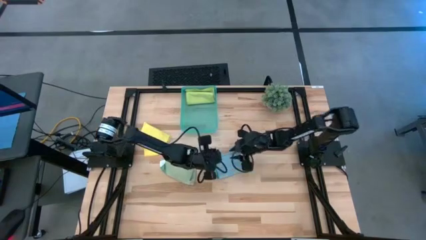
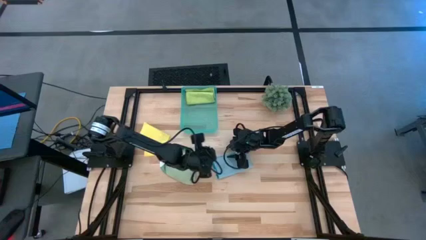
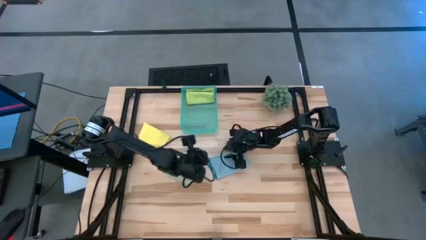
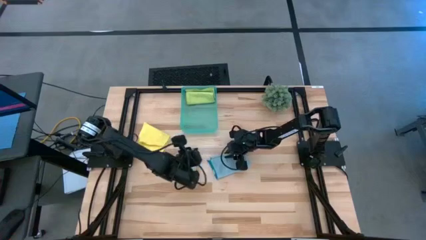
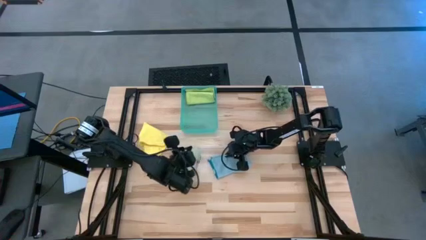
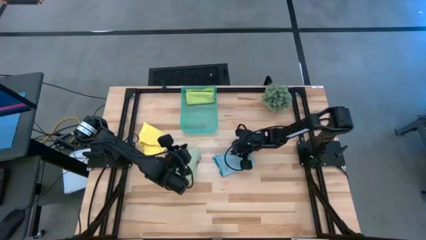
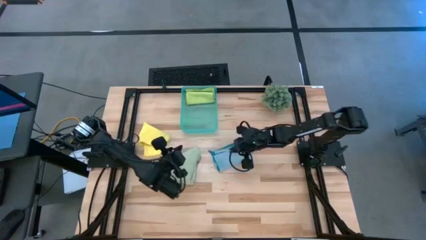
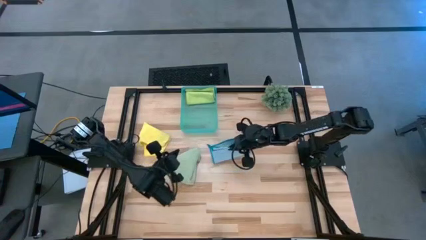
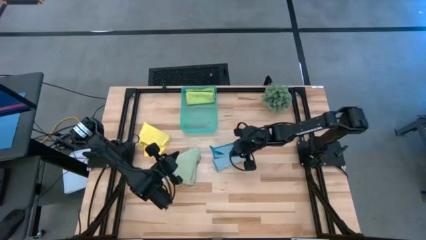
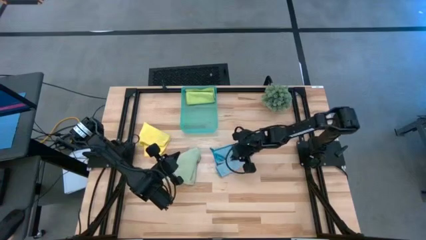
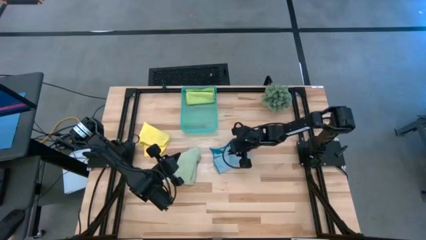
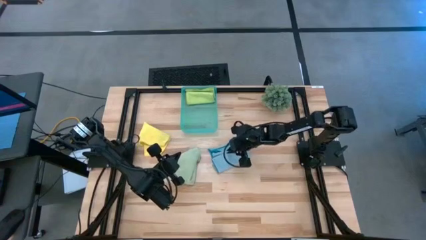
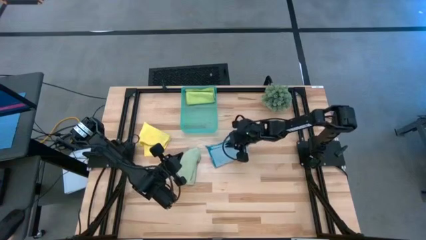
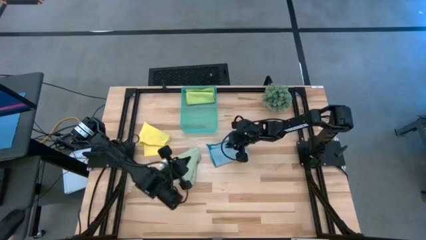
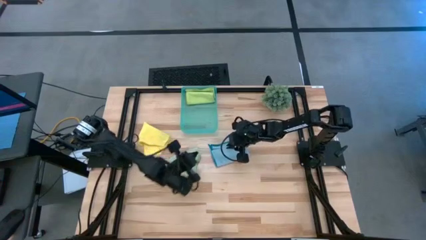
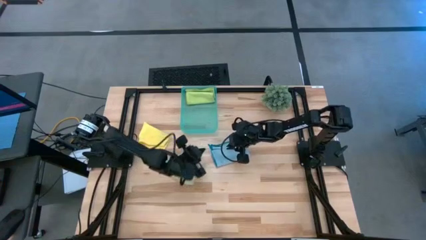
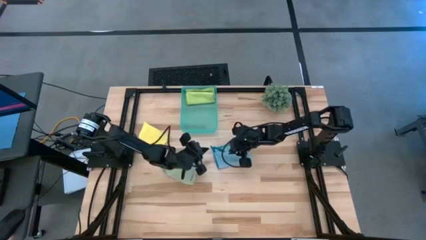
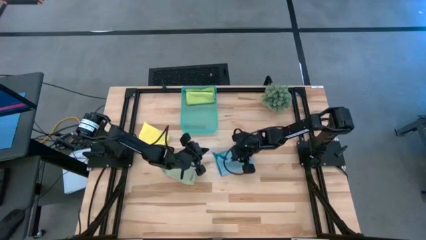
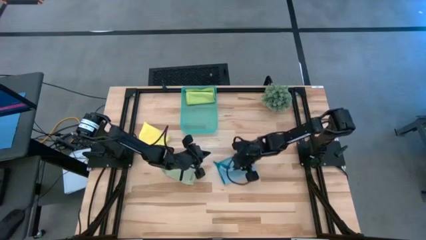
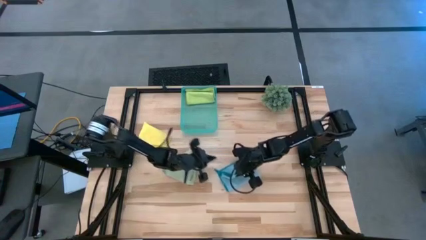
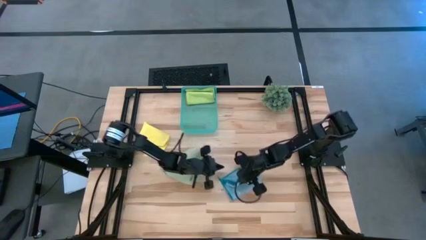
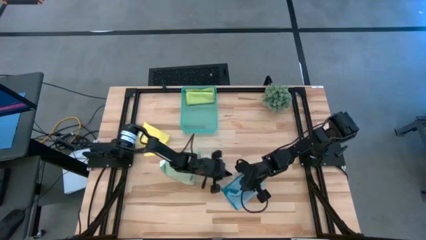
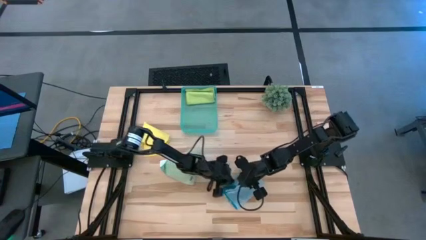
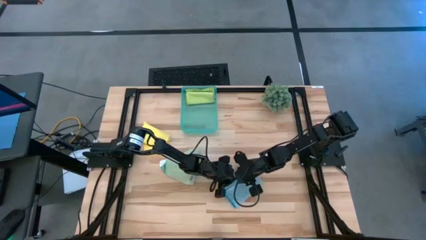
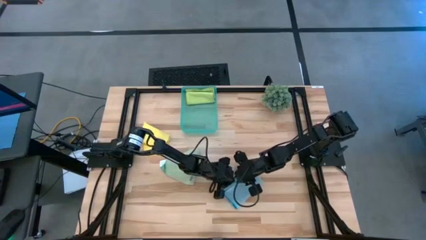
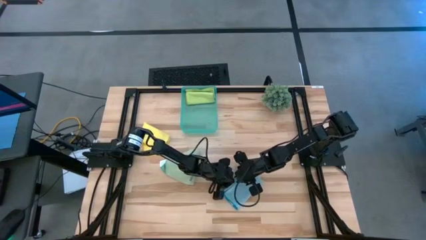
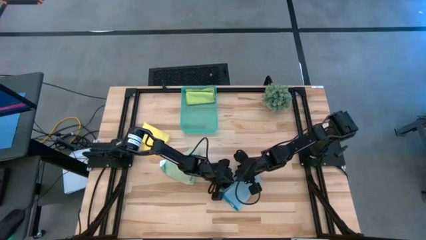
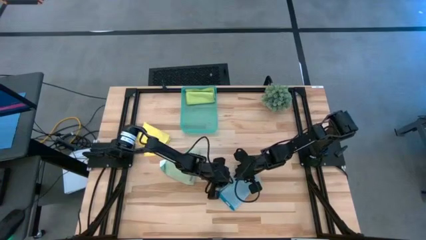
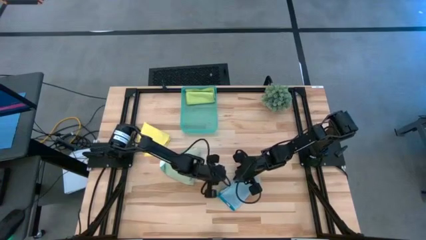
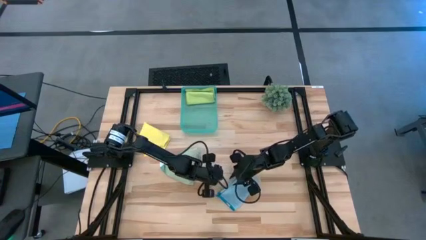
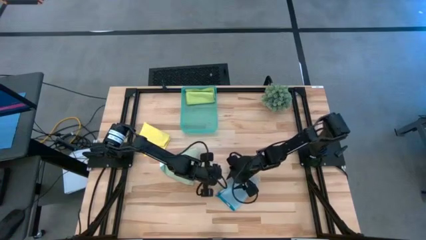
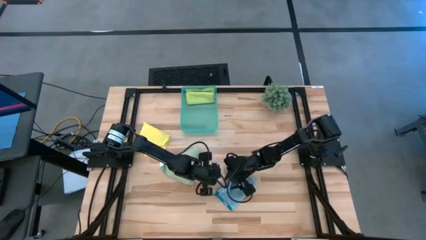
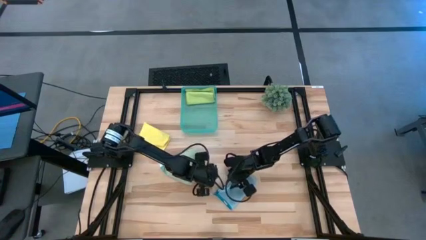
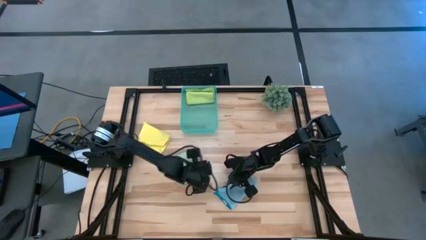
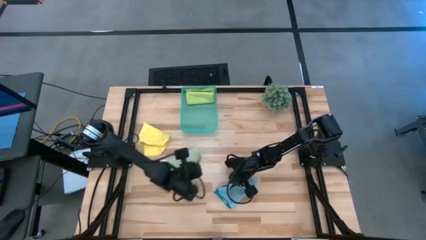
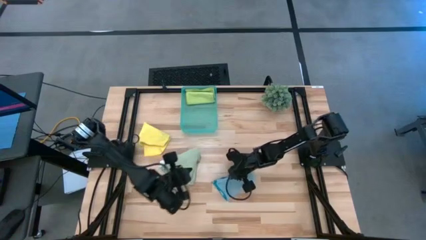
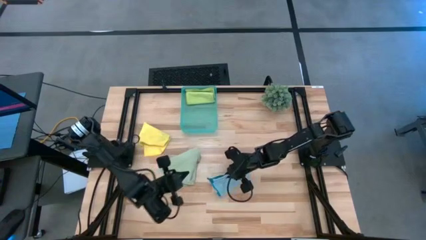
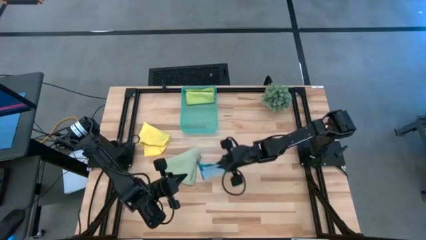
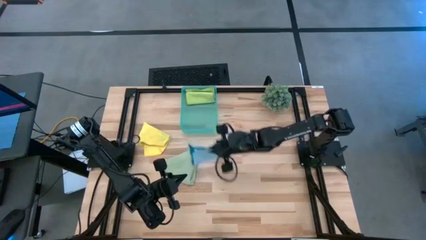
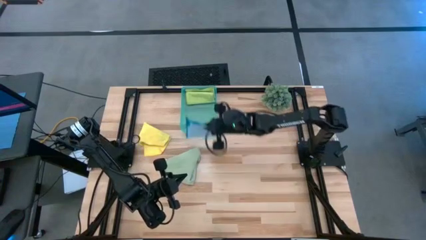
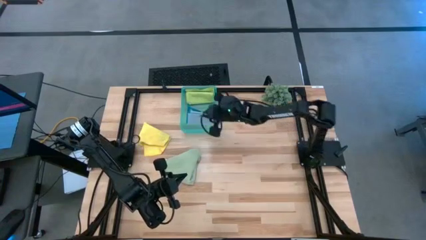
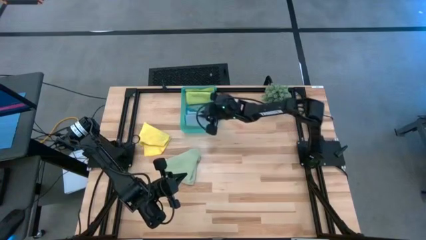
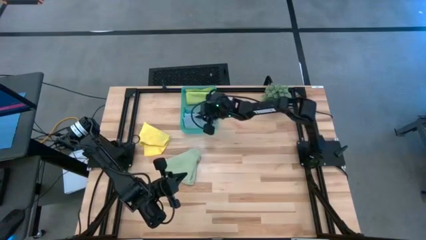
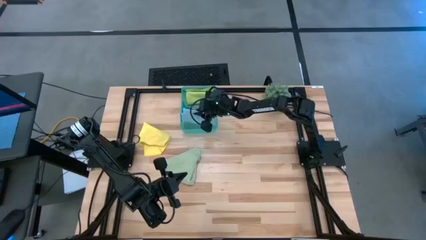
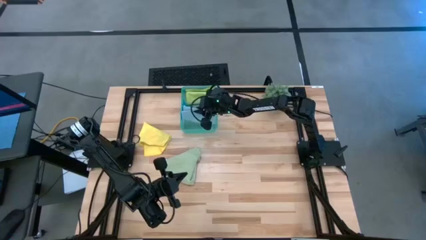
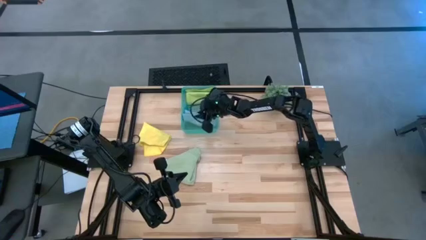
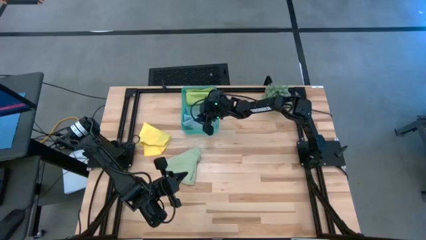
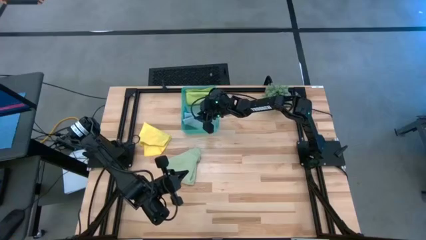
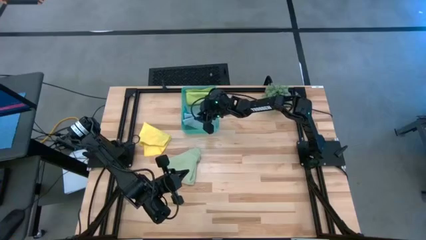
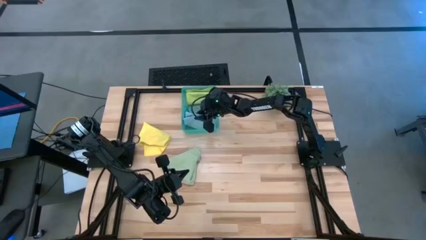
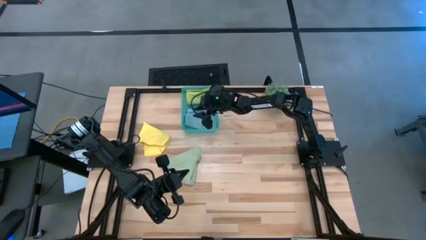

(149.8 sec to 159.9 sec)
Task: Fold microfiber towels
Put the blue microfiber cloth into the green bin

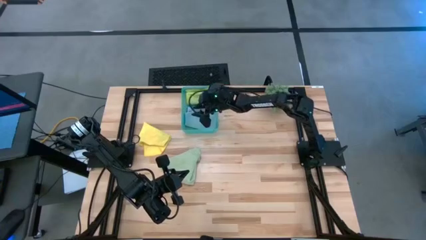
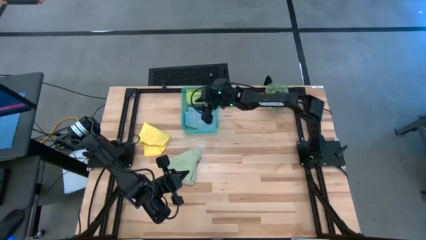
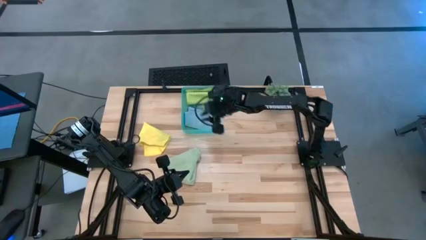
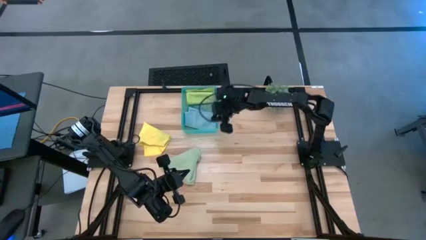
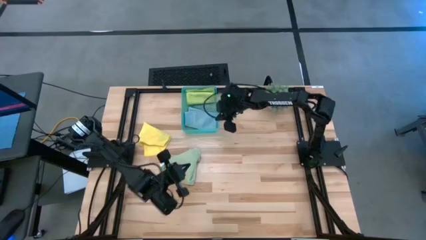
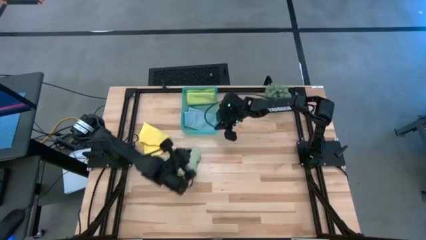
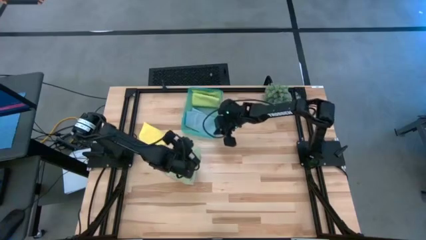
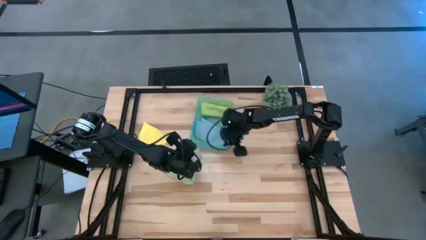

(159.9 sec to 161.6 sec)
Move the green bin to the center of the table

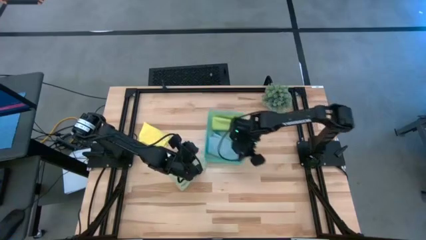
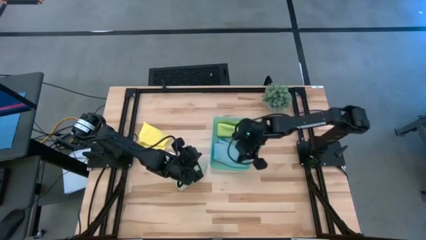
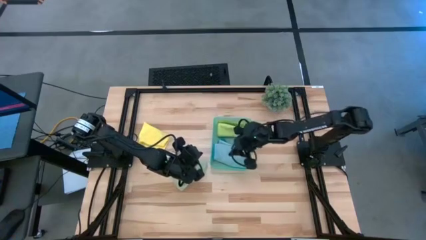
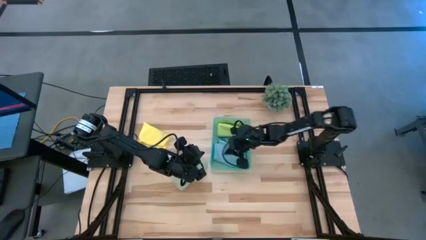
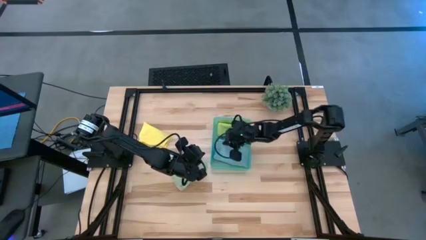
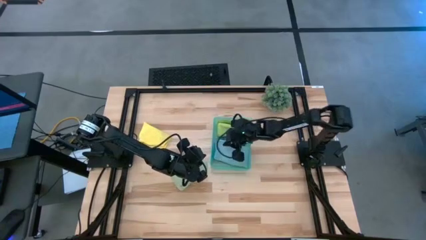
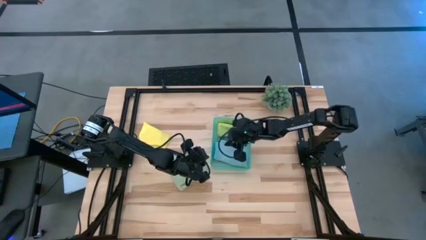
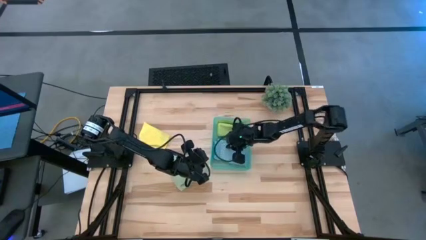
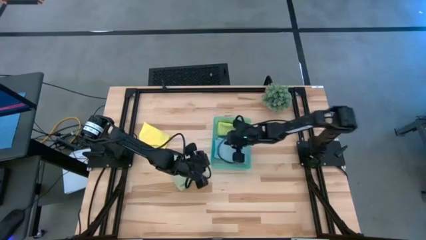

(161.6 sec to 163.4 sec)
Adjust the blue fold microfiber cloth in the green bin

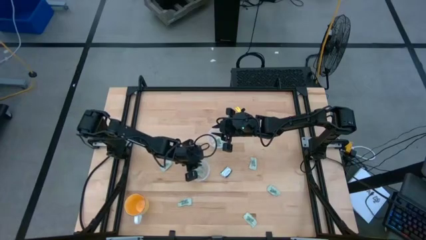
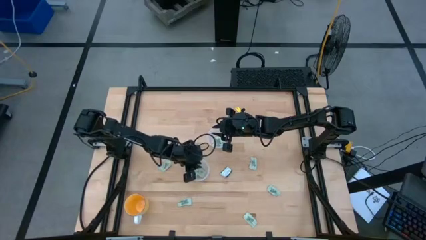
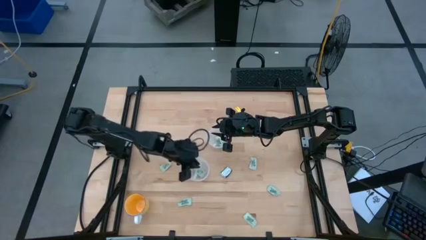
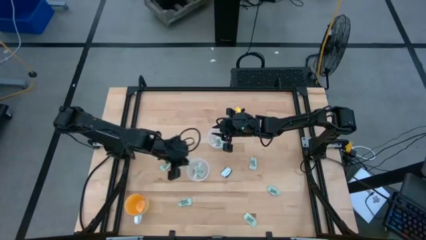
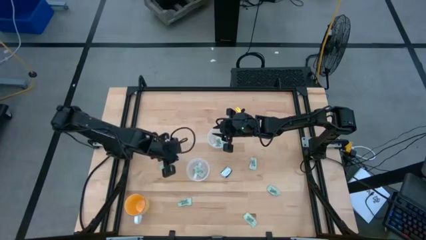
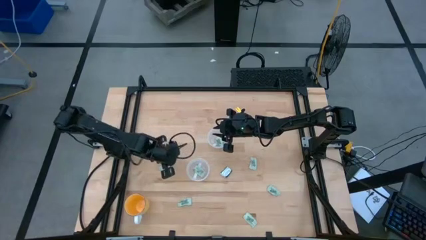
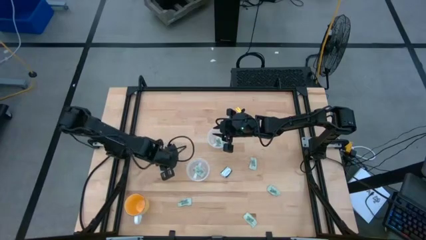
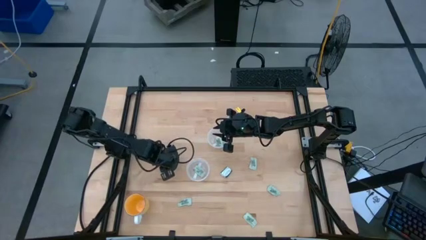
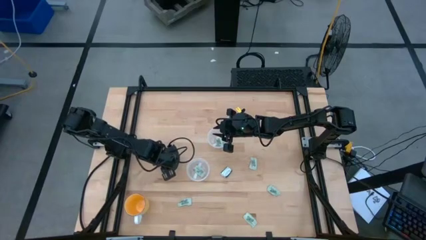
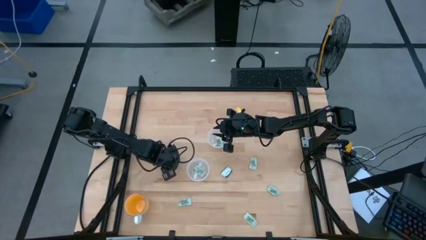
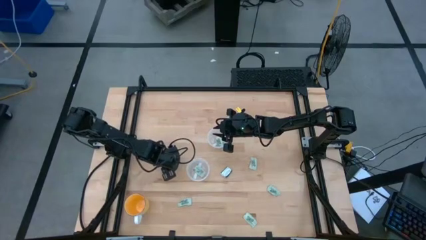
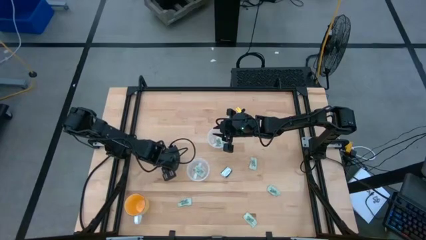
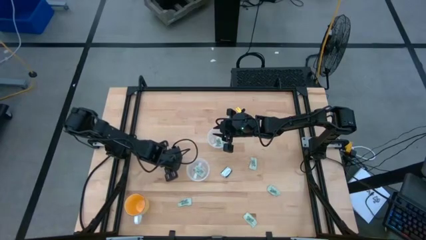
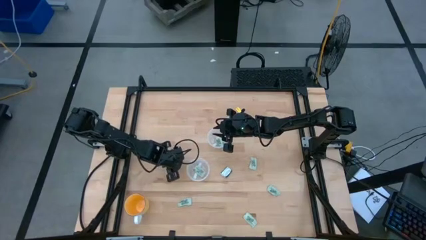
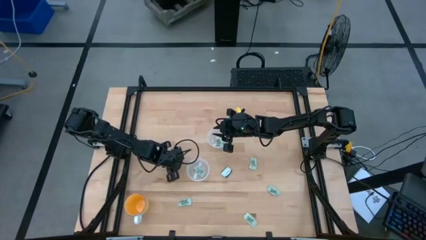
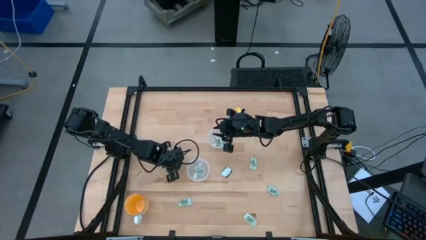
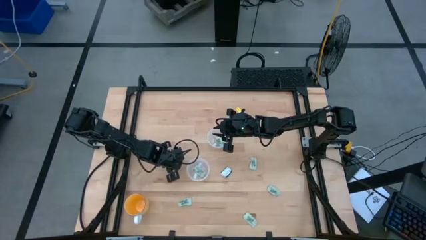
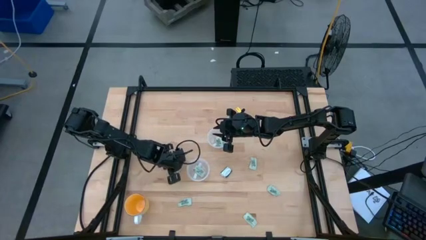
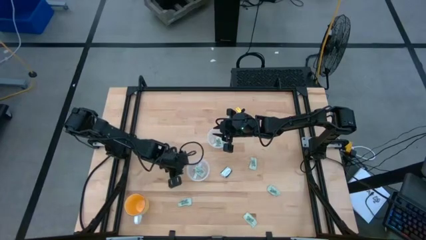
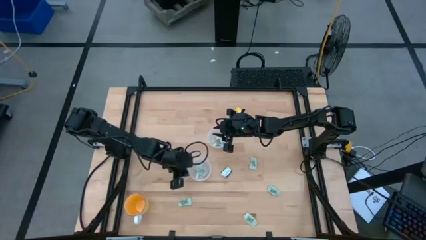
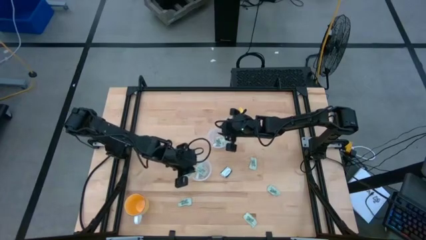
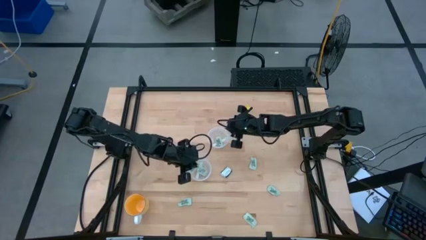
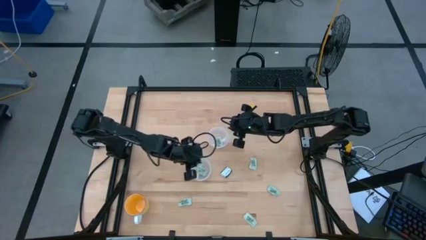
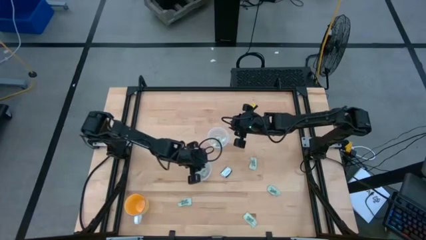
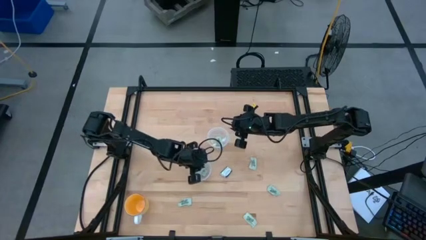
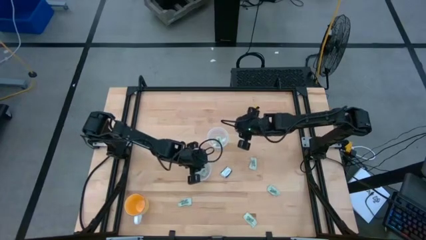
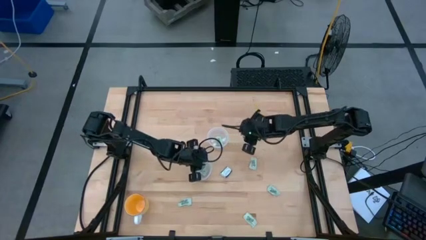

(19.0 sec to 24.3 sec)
Task: Pick and place Stevia / Truvia into bins
Put the stevia packet into the bottom transparent container
